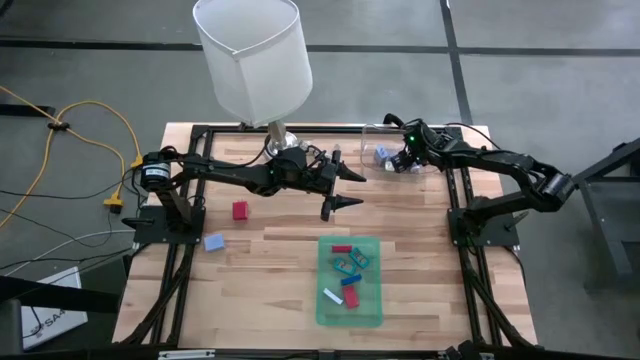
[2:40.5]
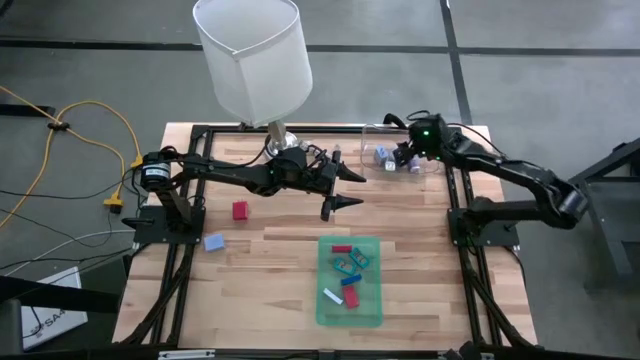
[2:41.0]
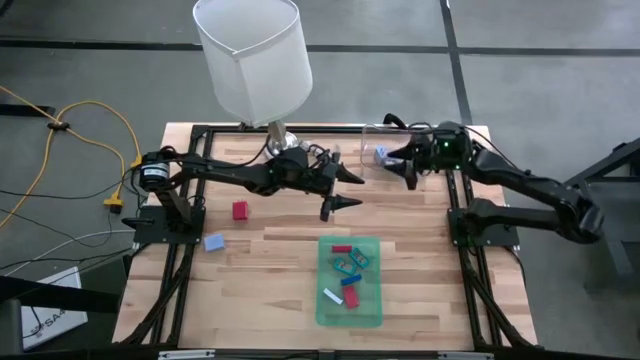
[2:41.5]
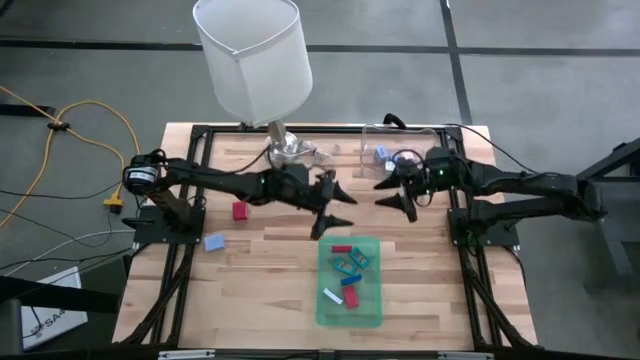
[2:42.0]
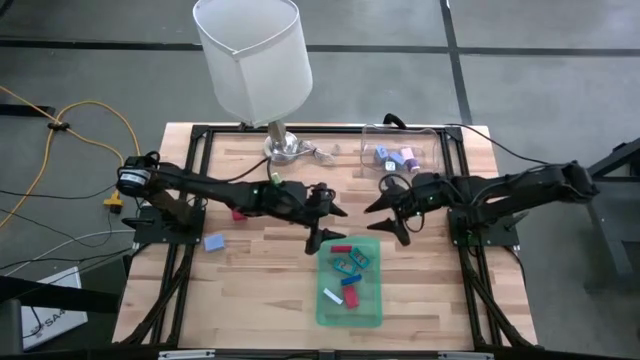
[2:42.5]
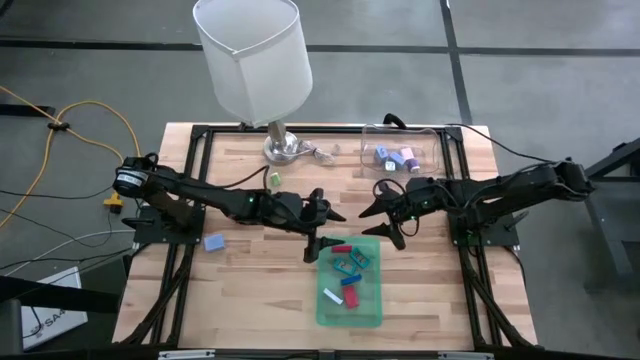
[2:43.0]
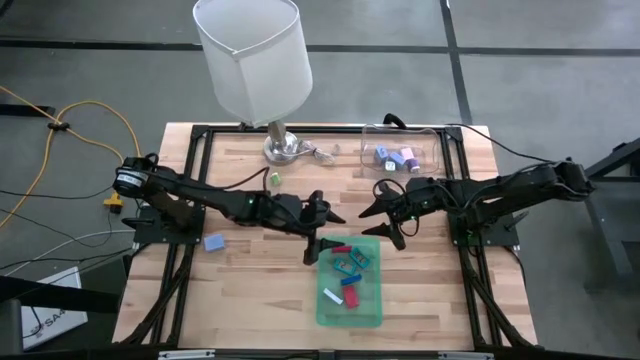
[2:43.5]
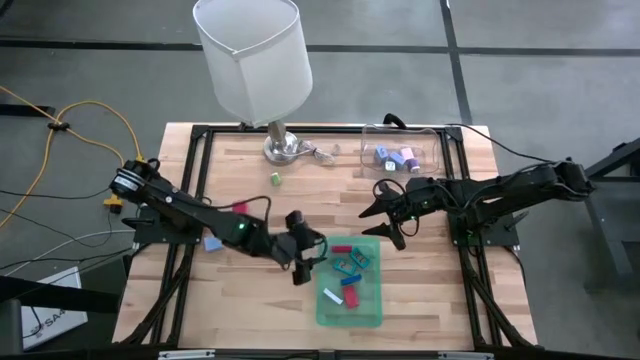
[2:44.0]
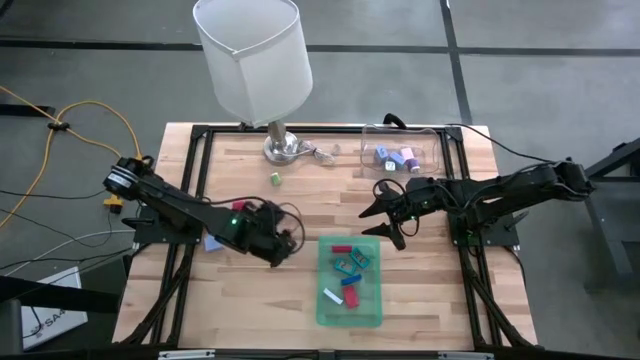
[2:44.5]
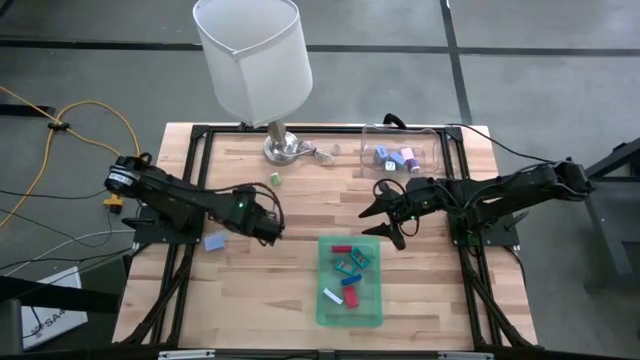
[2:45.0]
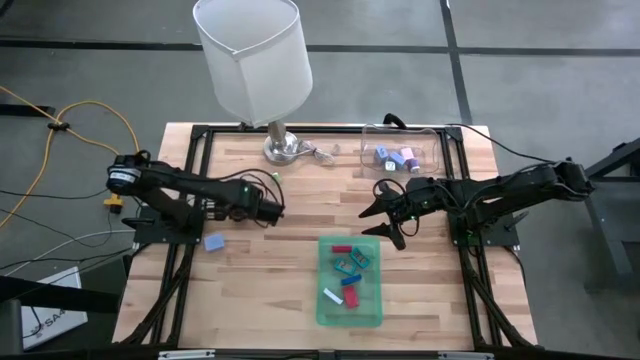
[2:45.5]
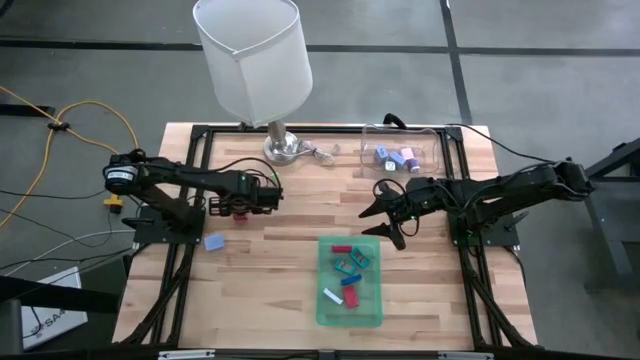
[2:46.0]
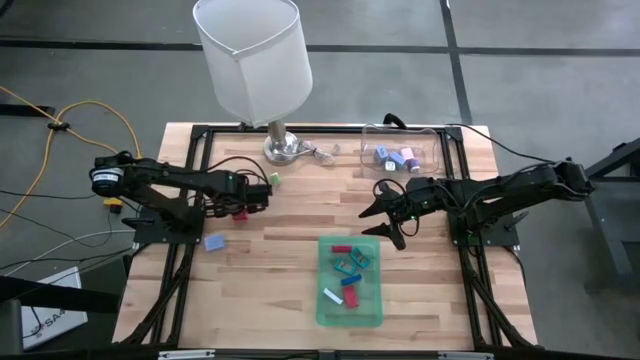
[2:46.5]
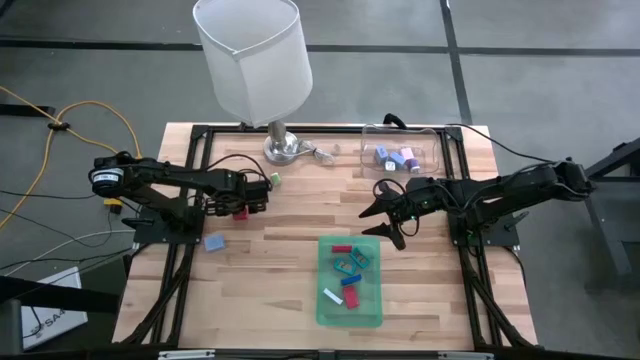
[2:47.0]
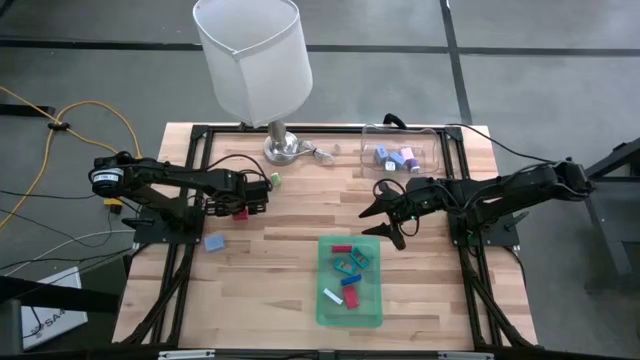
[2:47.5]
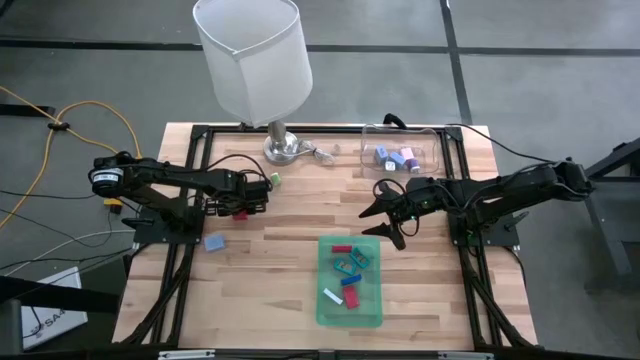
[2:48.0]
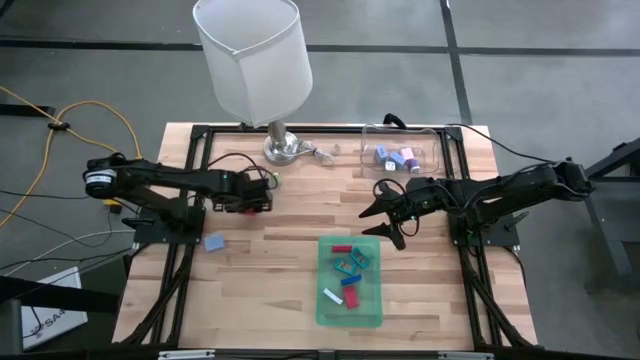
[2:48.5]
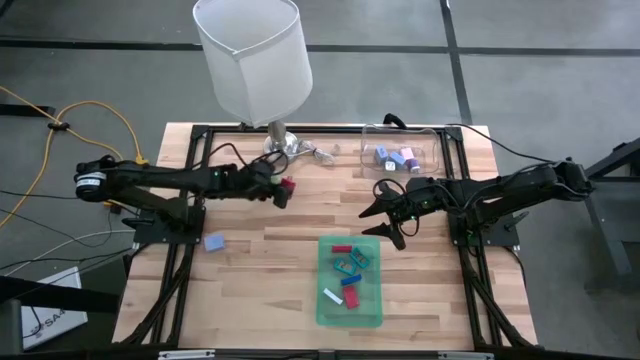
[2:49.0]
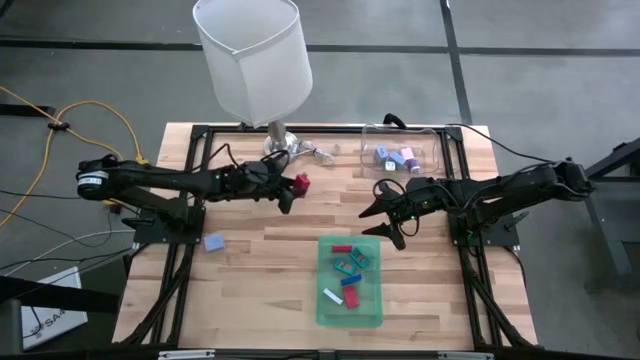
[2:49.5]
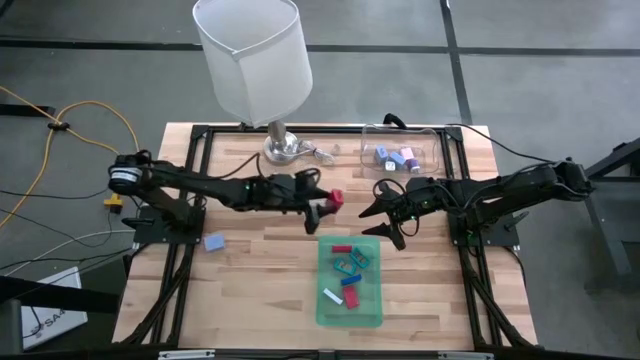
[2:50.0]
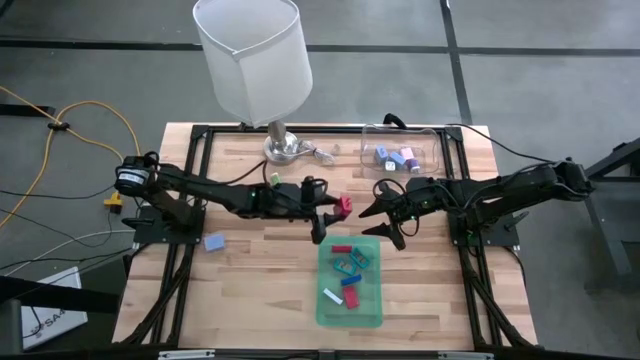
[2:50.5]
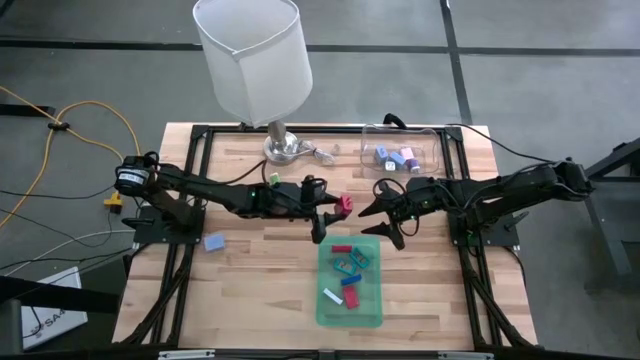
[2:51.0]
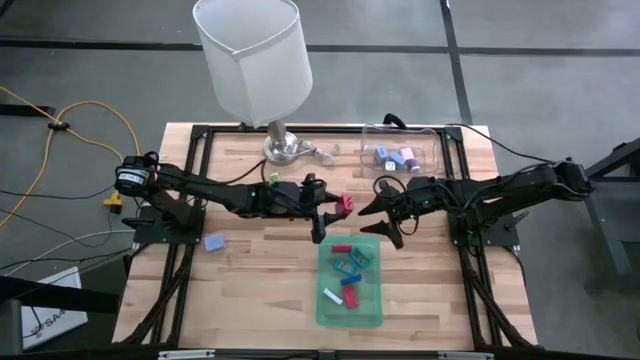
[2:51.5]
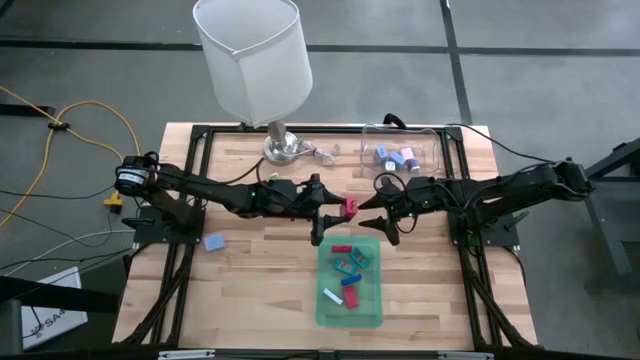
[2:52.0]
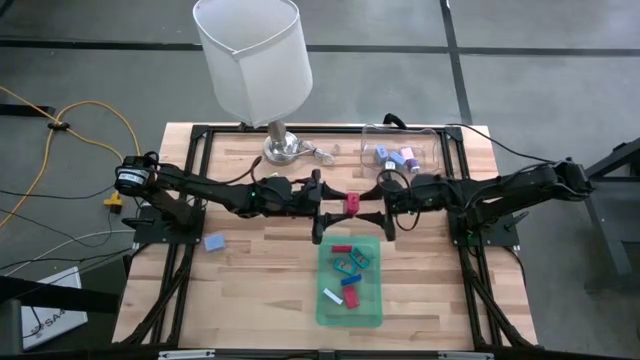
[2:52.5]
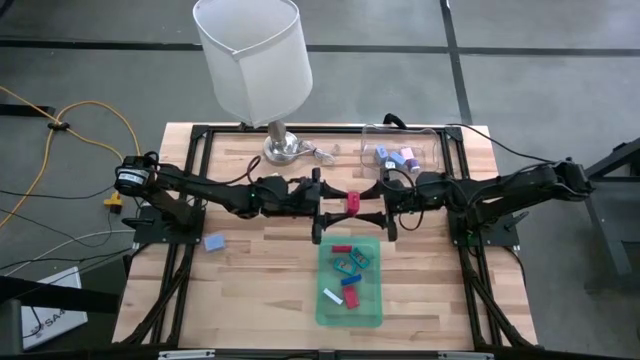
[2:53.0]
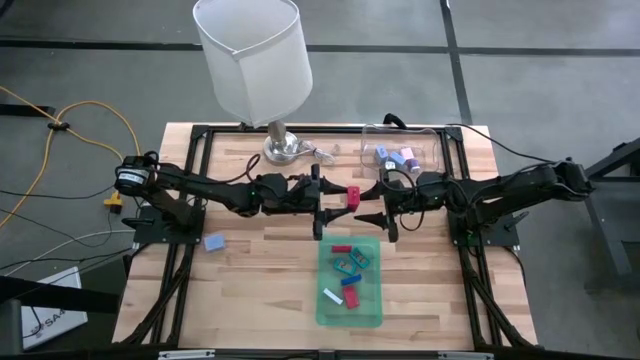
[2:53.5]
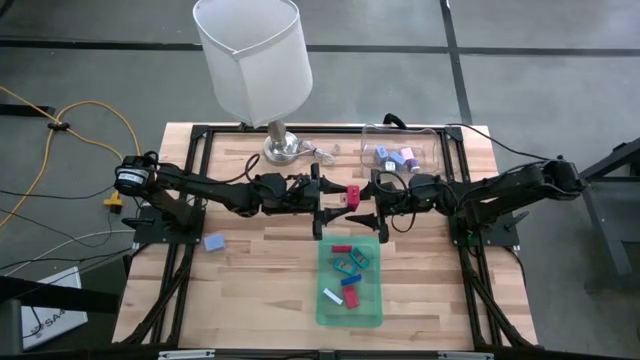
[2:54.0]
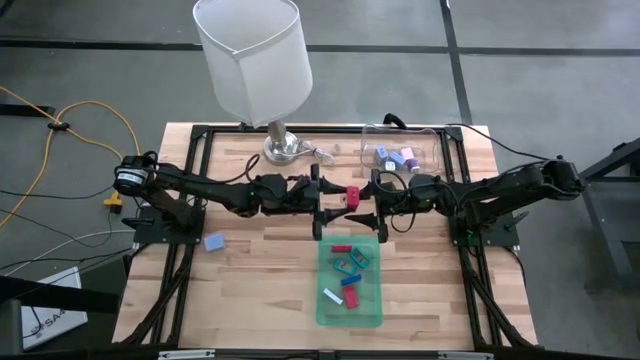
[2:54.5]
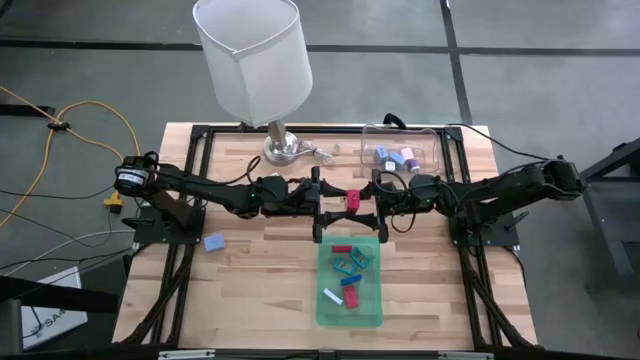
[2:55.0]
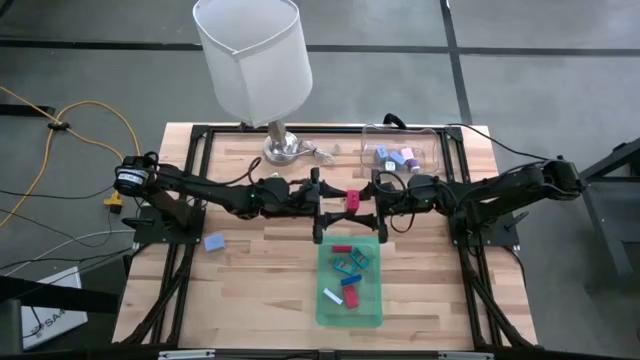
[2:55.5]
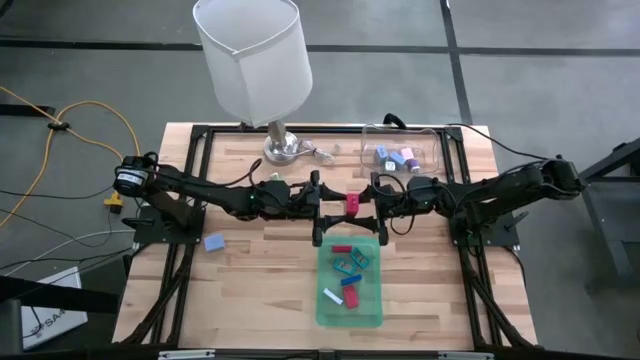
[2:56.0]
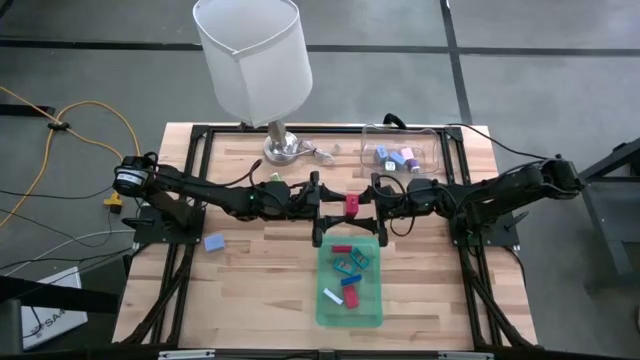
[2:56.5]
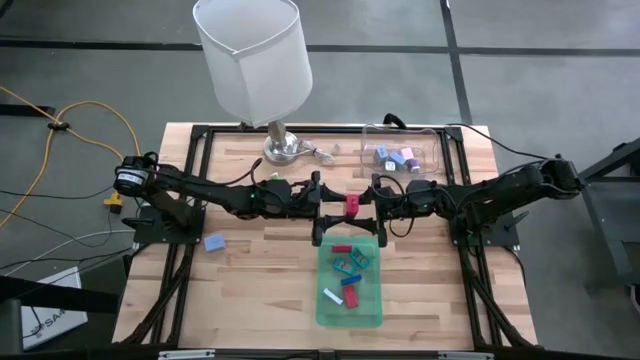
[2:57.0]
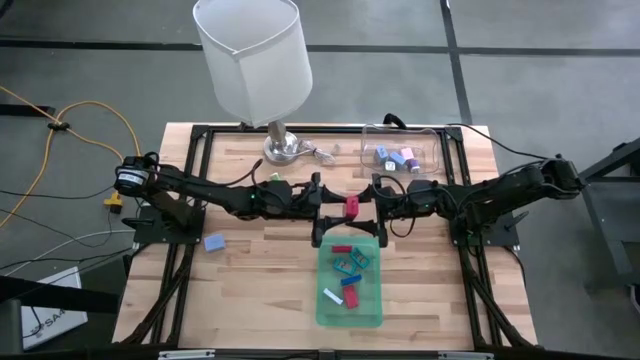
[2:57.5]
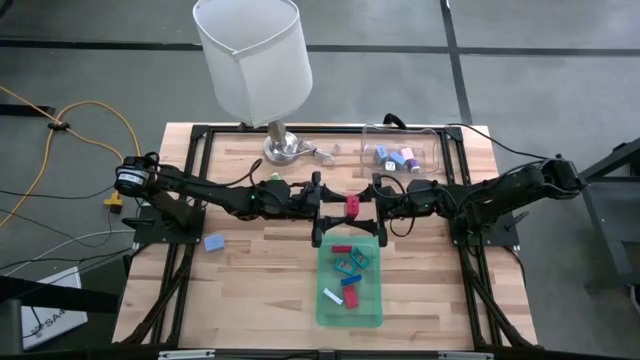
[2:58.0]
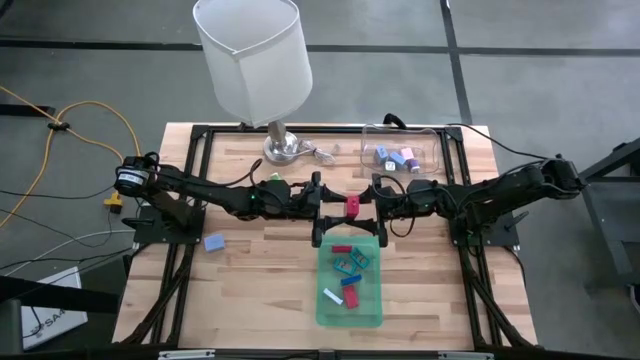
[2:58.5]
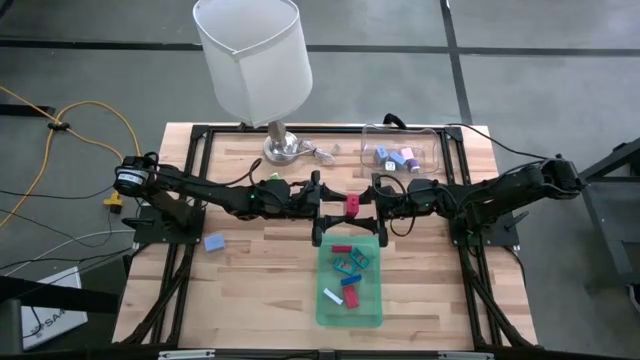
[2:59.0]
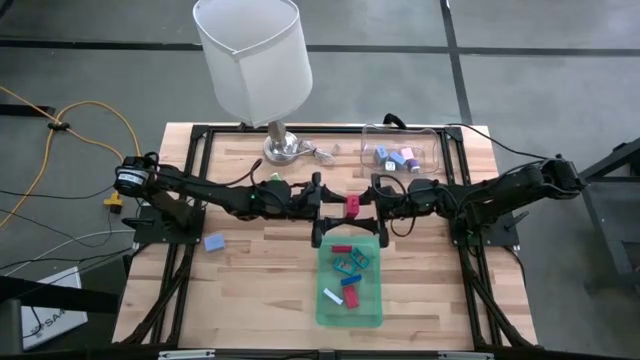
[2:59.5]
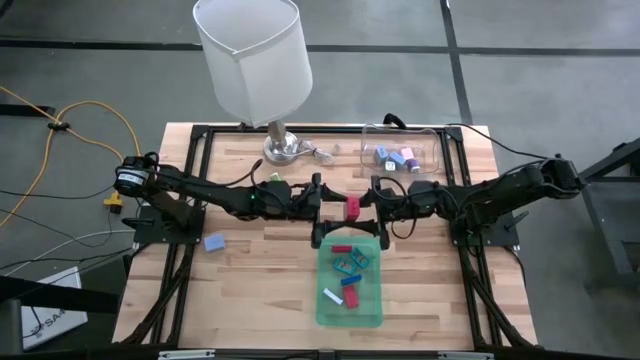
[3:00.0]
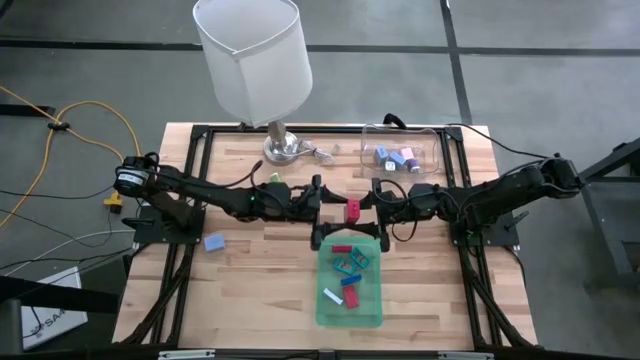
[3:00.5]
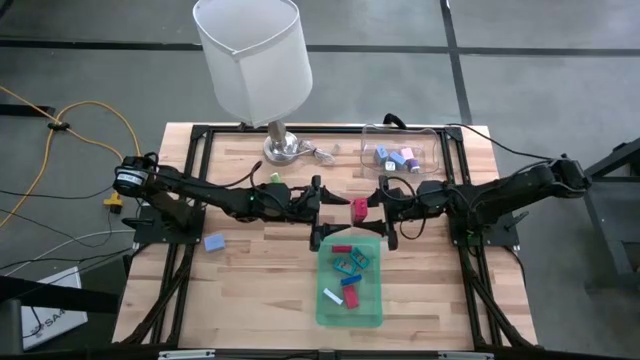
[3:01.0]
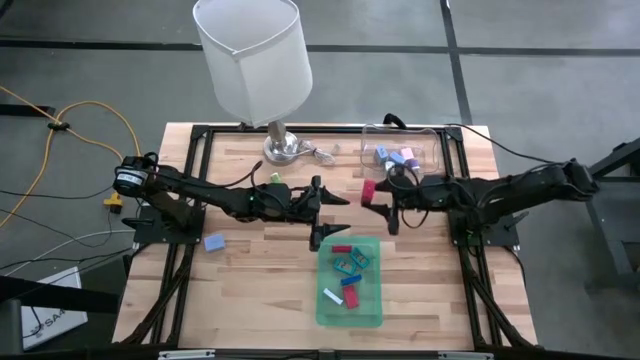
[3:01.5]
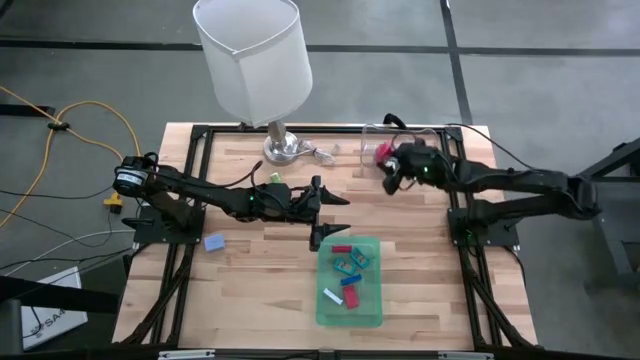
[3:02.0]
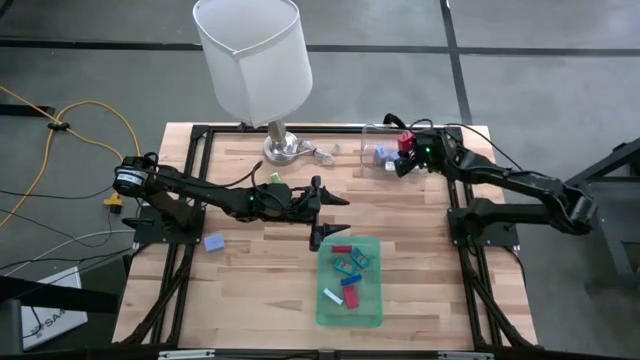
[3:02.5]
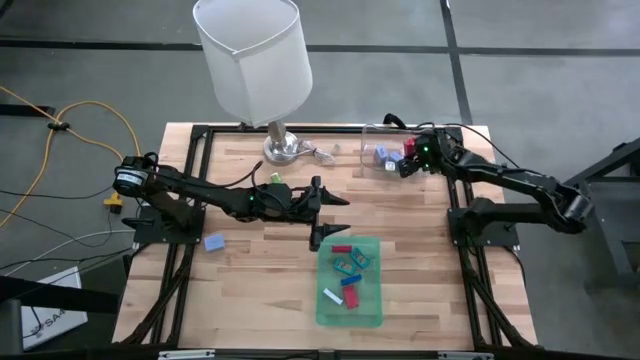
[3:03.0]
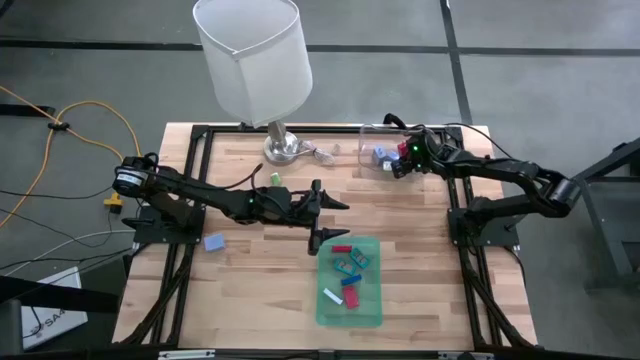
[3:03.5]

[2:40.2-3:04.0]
Task: Pick & Place Office items
Put the red charger adapter into the transparent bin
